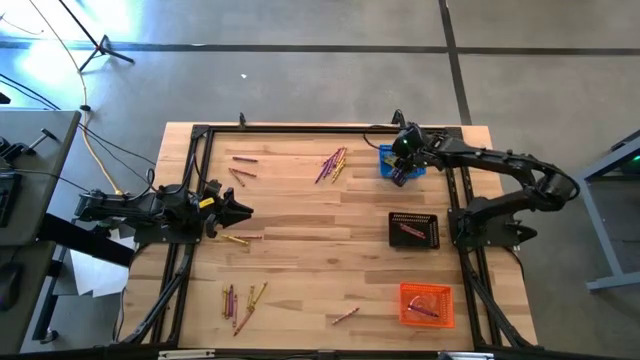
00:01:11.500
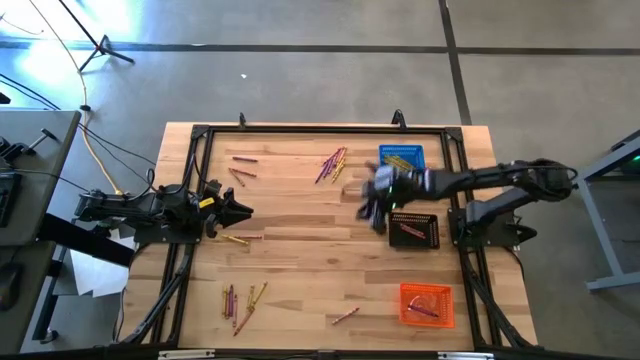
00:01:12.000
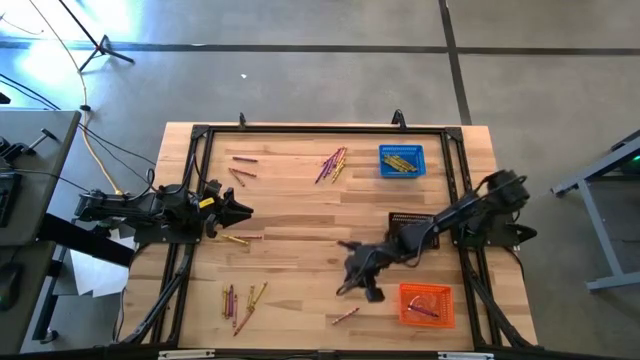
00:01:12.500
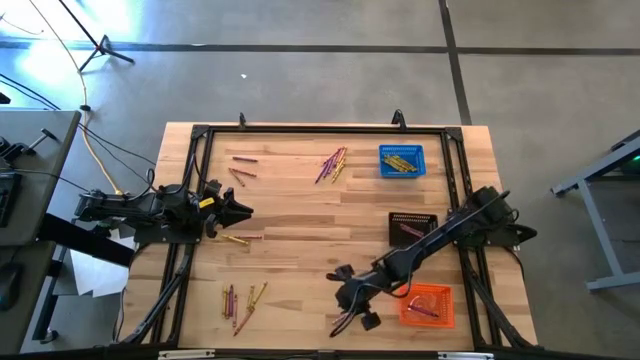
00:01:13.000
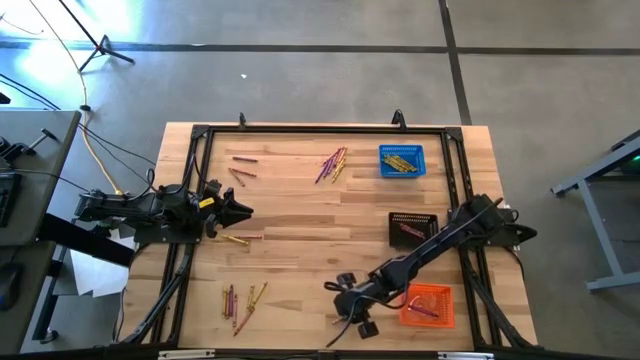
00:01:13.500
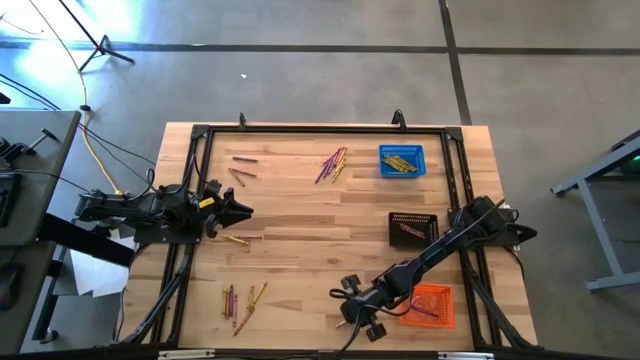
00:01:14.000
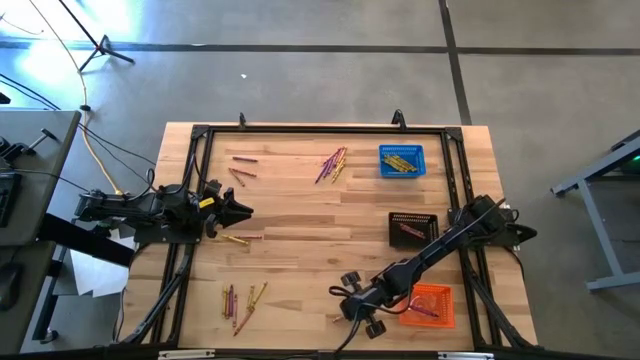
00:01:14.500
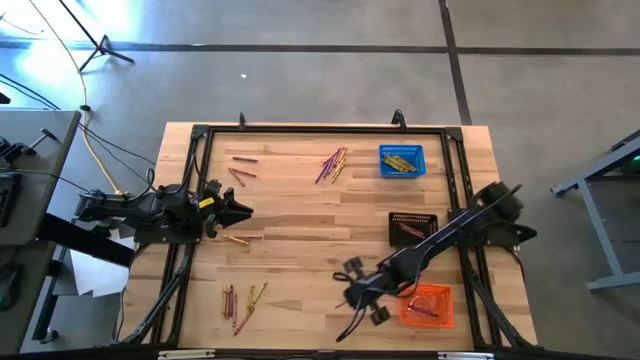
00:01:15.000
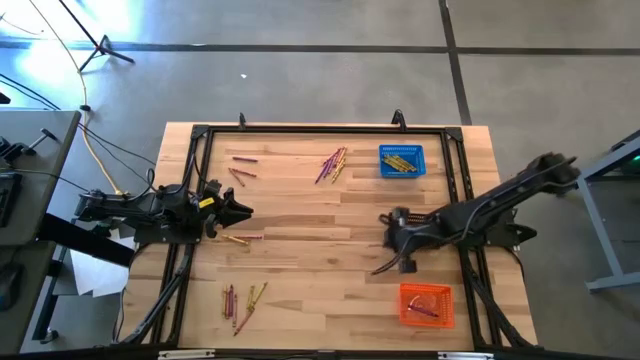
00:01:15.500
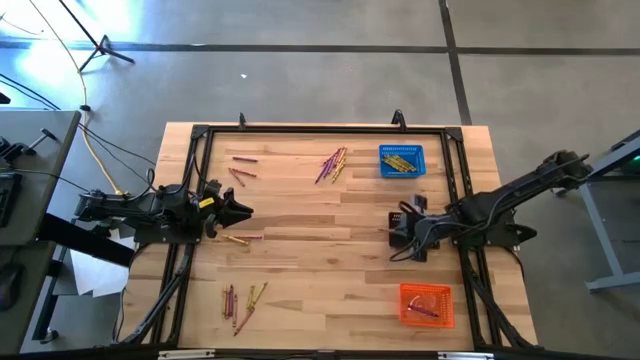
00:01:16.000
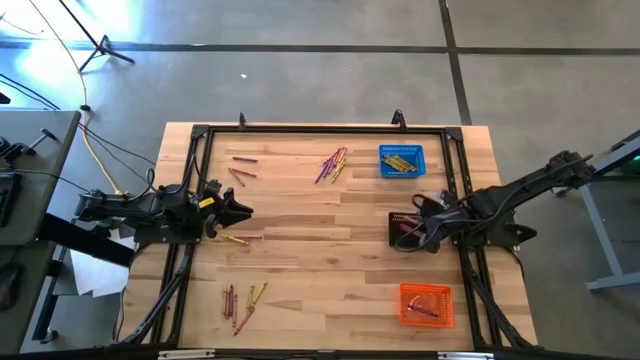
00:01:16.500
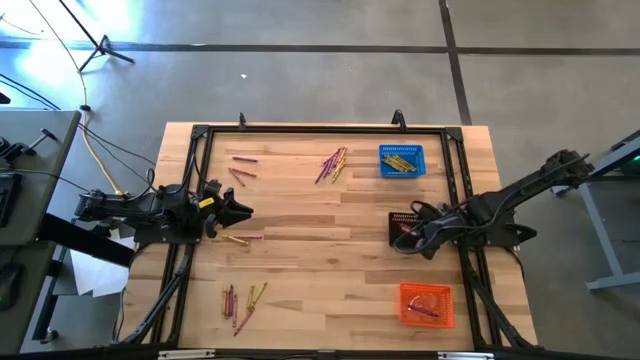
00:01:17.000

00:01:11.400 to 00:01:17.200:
Task: Sort crayons
Put the red crayon into the black bin

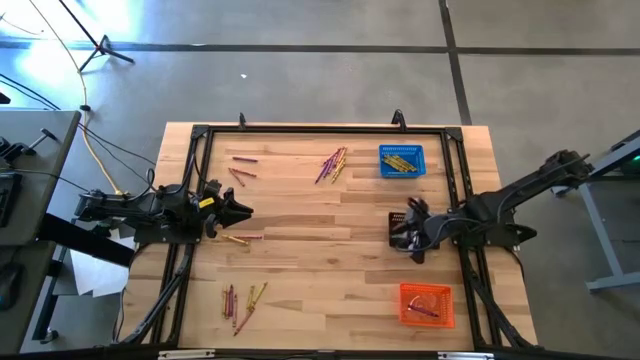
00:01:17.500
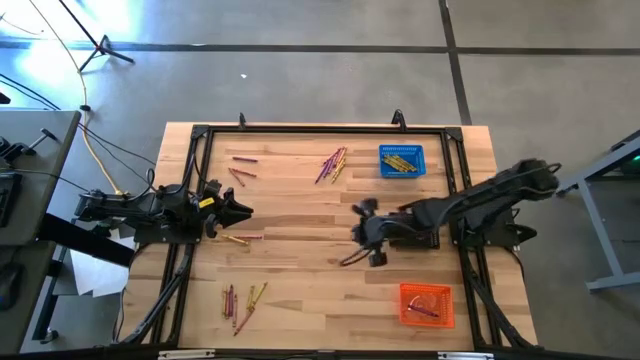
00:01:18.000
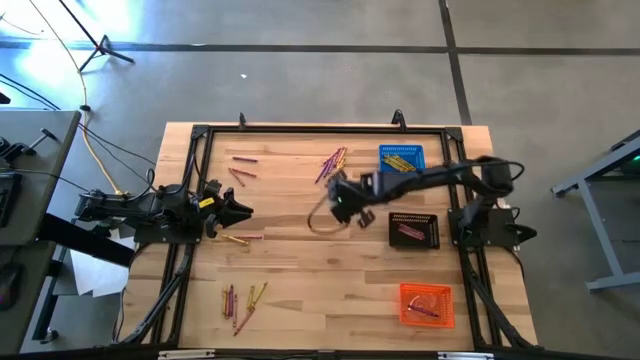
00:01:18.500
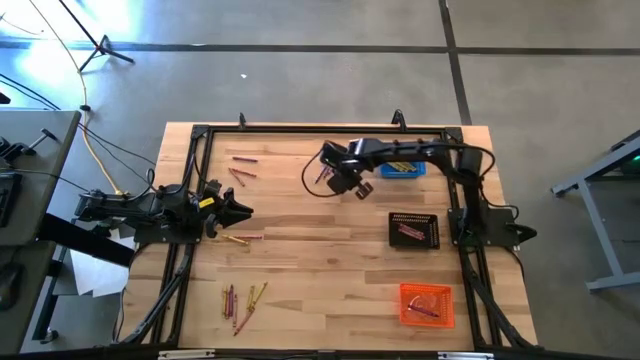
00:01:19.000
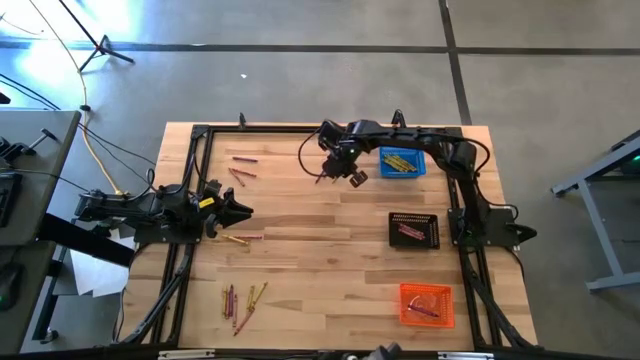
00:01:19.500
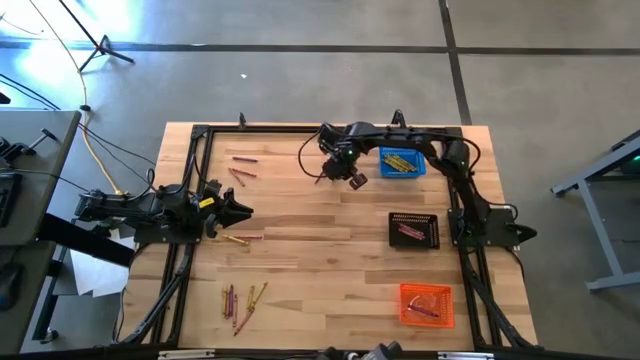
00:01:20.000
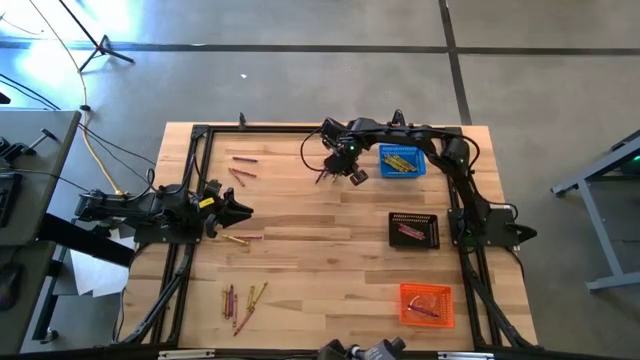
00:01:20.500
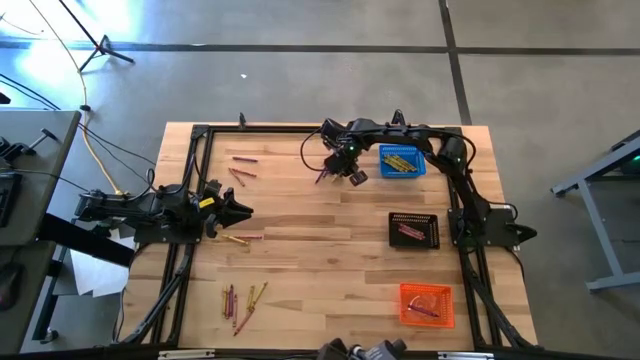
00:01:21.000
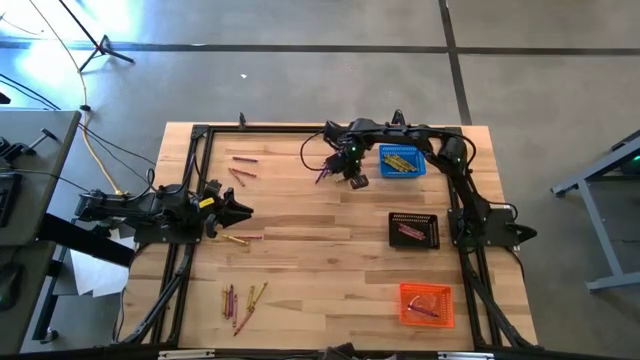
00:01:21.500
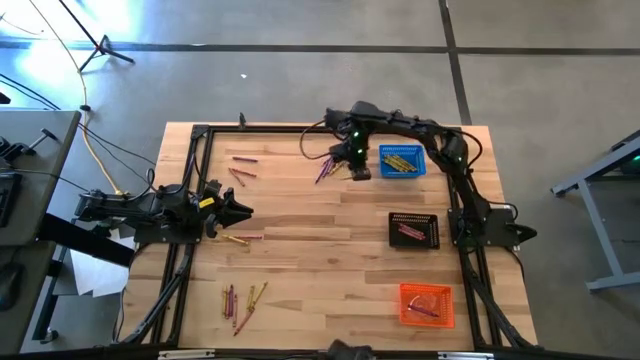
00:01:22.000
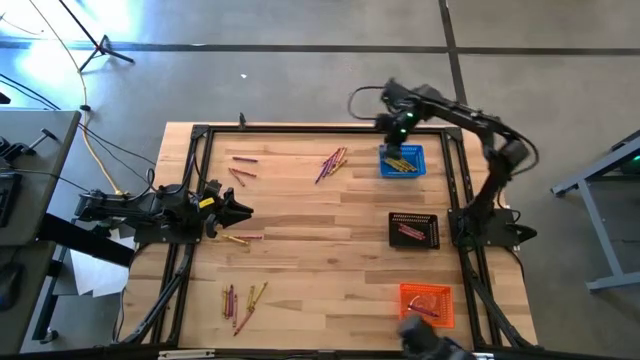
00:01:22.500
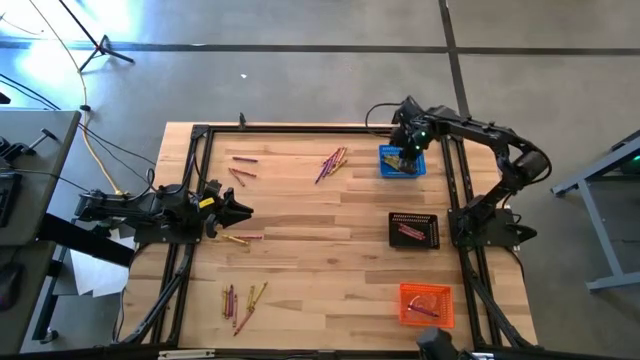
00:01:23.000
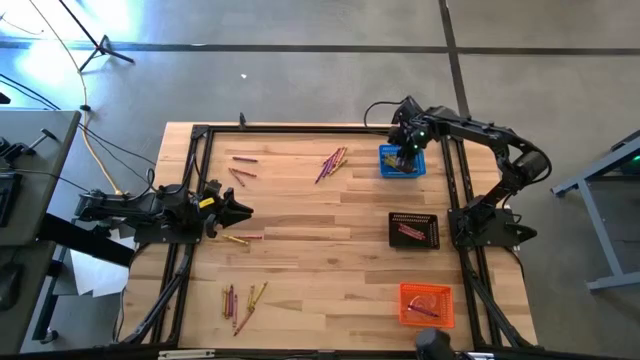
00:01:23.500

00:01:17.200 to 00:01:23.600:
Put the yellow crayon into the blue bin

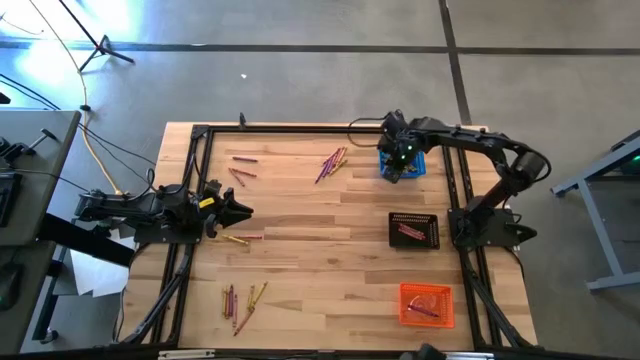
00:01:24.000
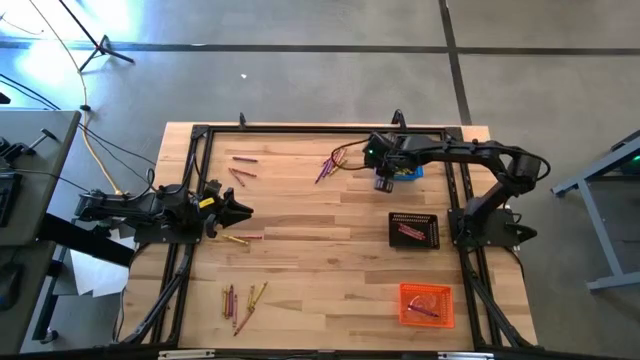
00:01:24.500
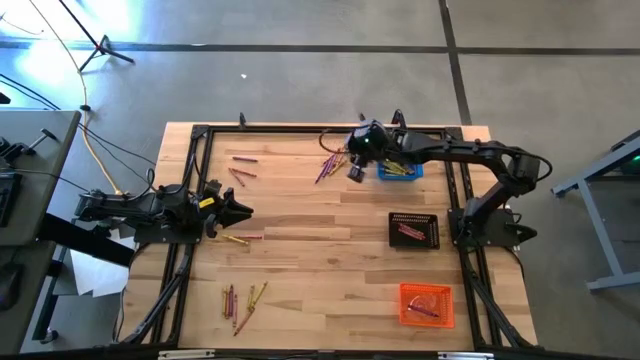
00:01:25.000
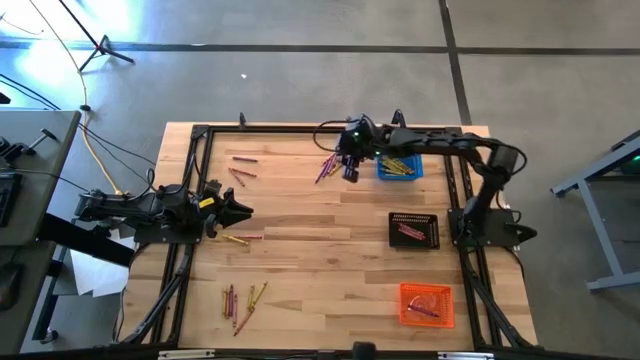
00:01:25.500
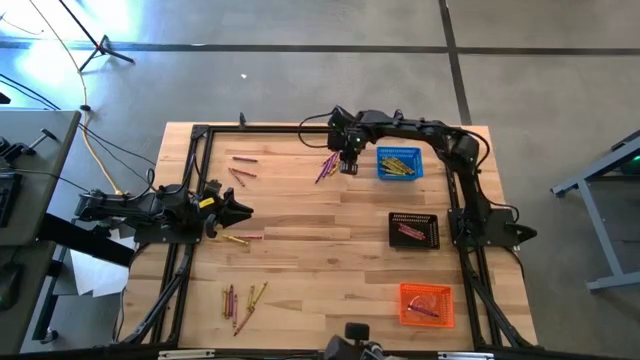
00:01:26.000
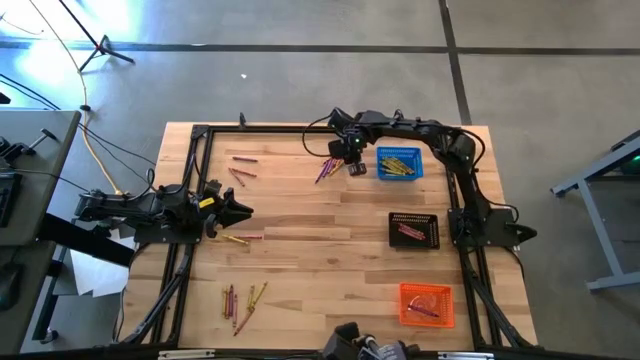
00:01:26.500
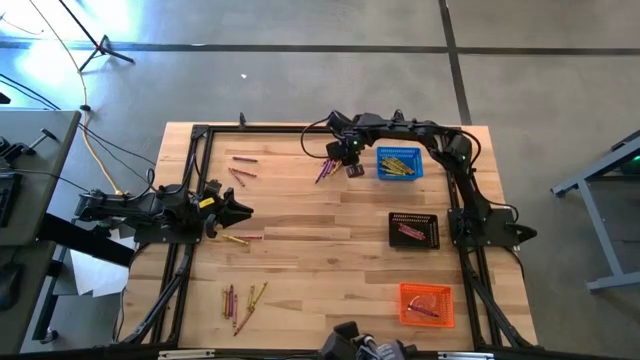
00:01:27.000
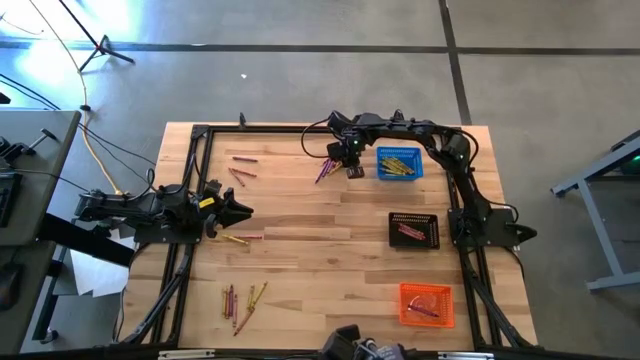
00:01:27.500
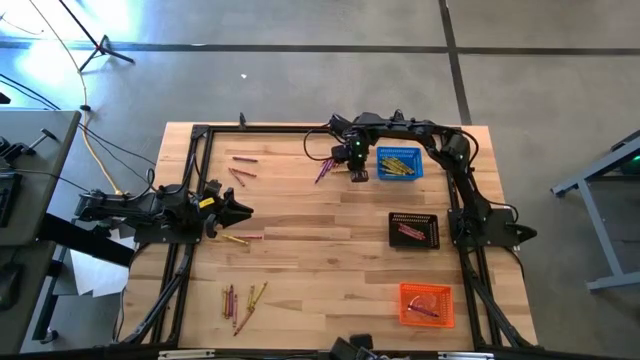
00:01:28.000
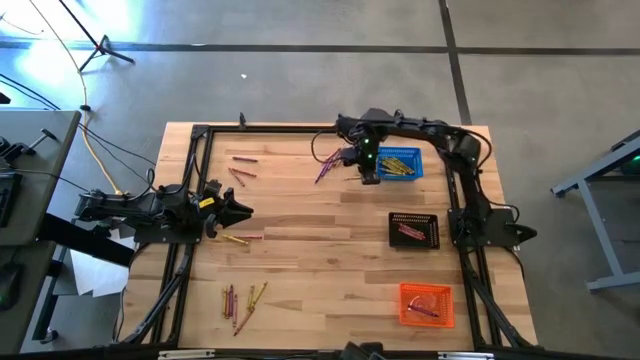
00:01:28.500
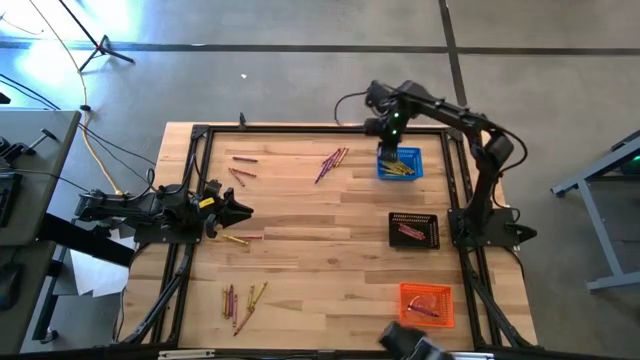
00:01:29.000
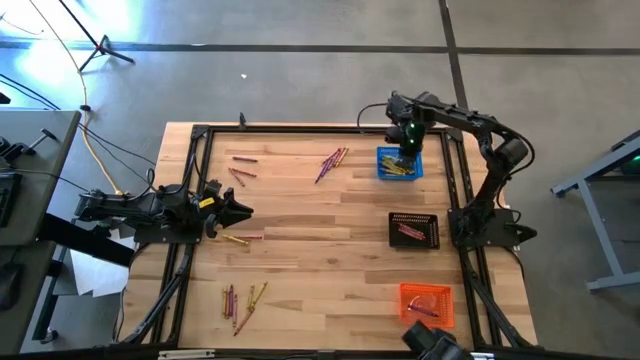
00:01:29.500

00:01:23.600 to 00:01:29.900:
Put the yellow crayon into the blue bin

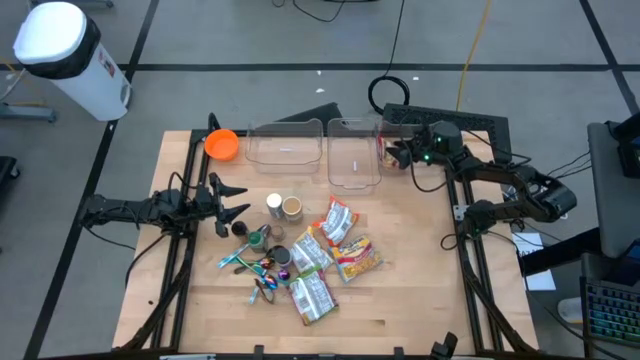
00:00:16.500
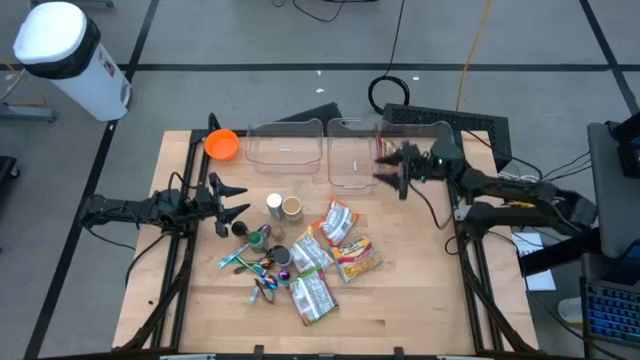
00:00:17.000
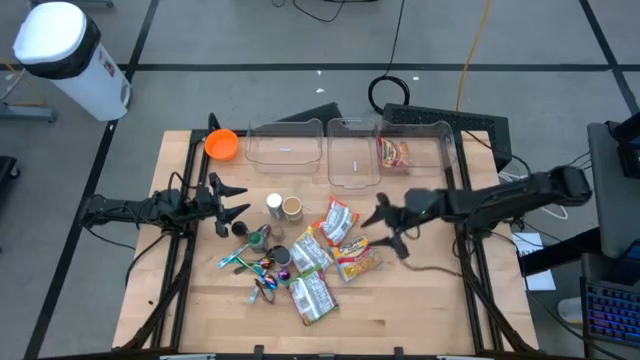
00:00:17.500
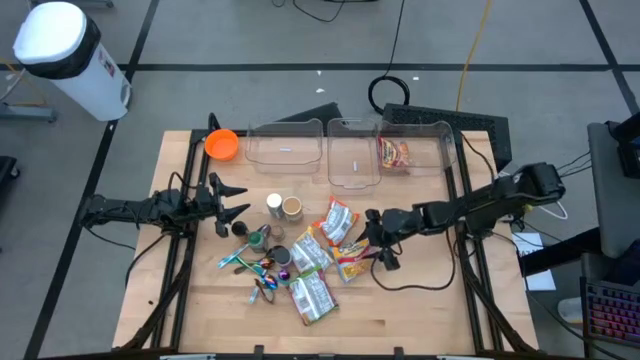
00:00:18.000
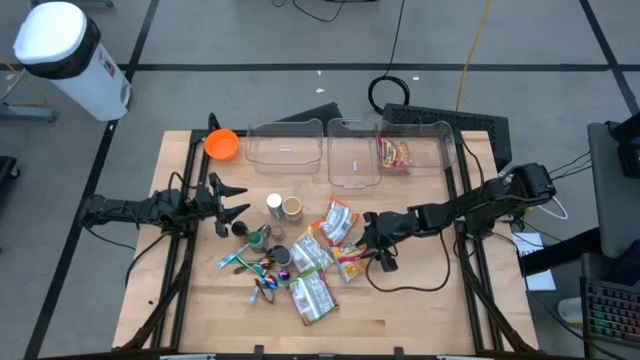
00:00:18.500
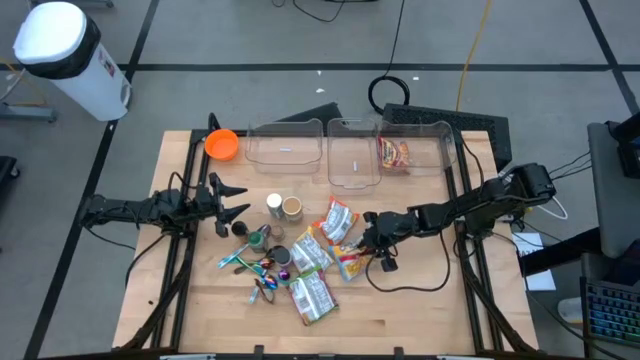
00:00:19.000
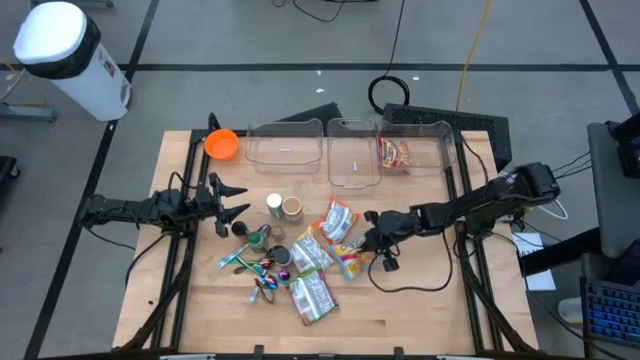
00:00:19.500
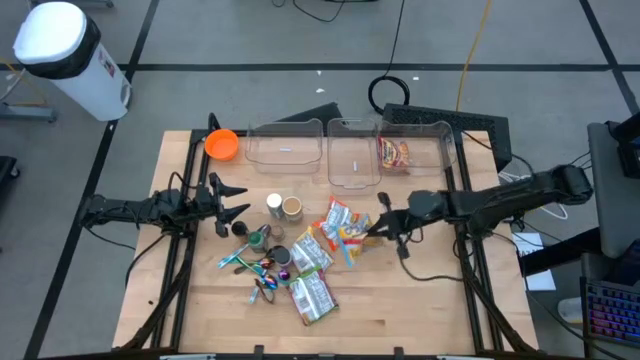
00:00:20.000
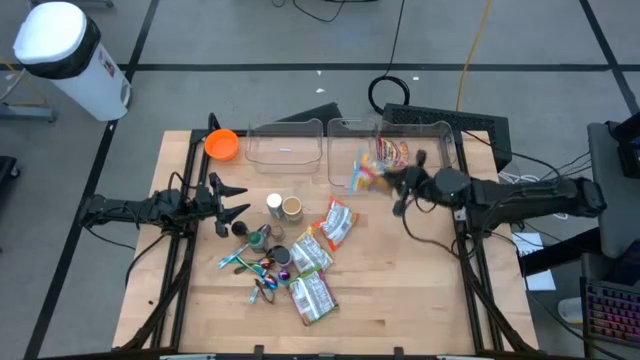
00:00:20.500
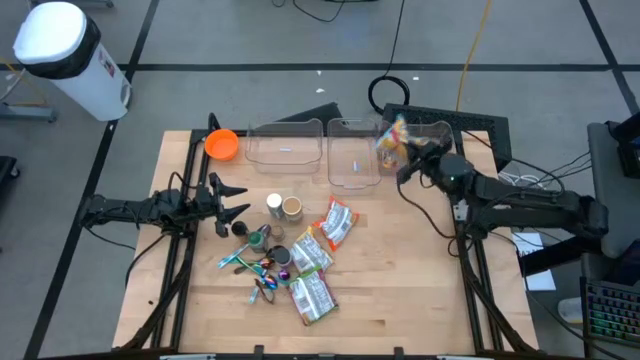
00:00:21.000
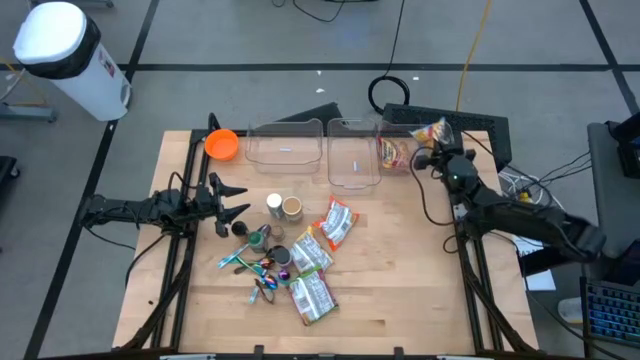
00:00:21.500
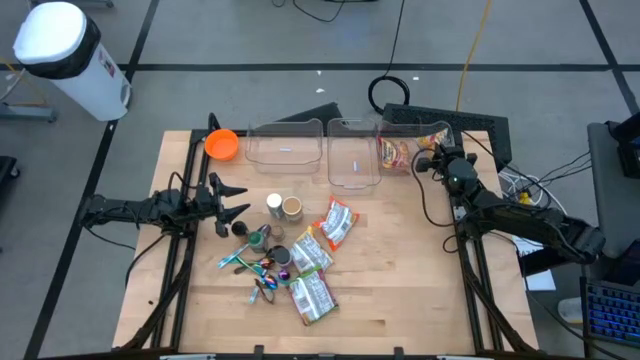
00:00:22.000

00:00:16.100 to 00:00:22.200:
Task: Pick & Place Food Item
Put the blue noodle pack into the right transparent bin
